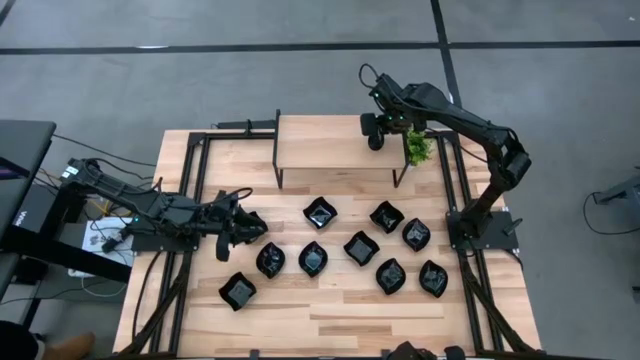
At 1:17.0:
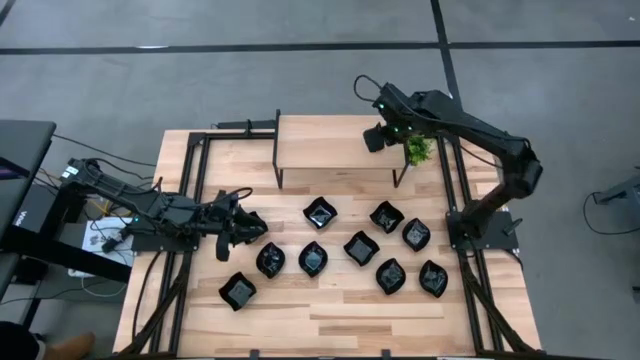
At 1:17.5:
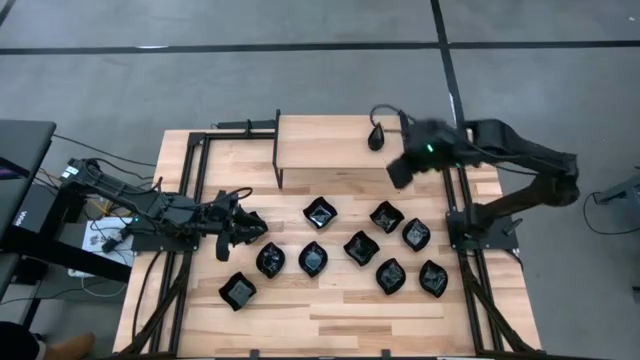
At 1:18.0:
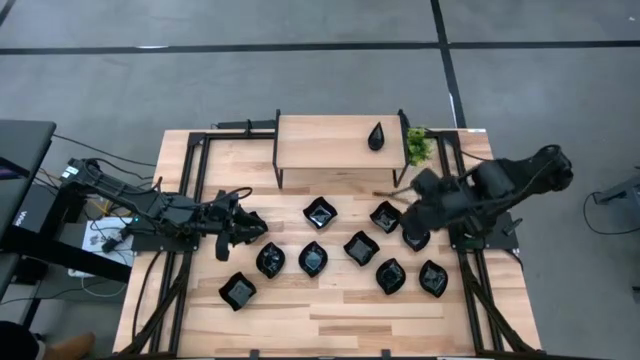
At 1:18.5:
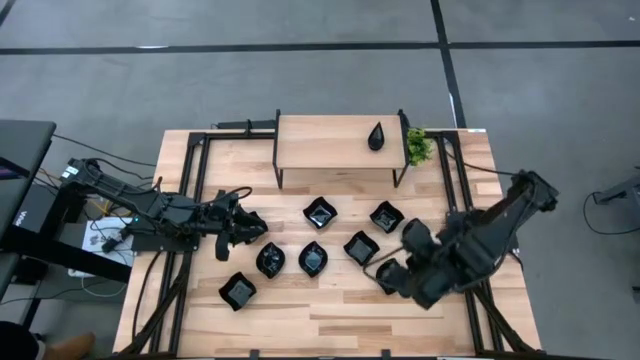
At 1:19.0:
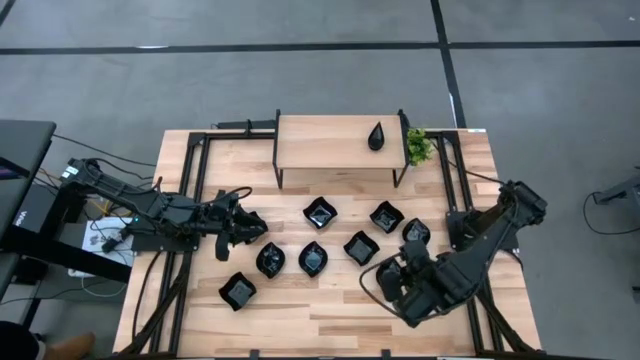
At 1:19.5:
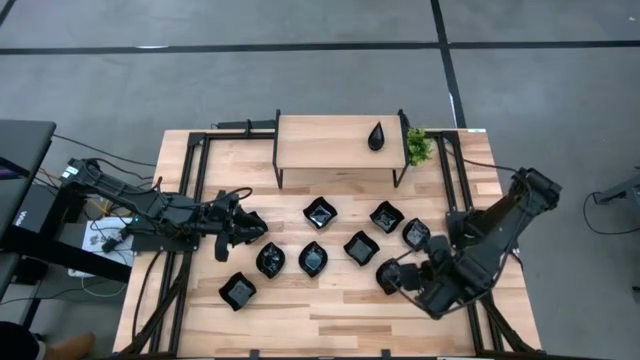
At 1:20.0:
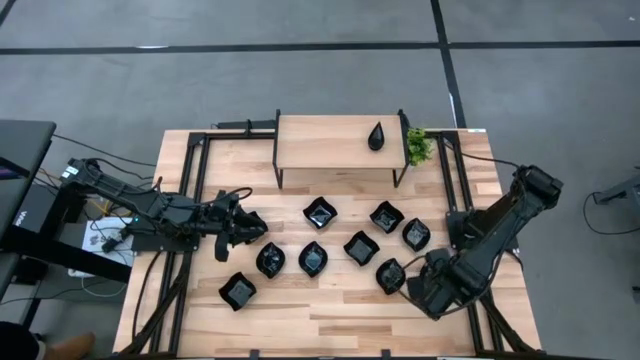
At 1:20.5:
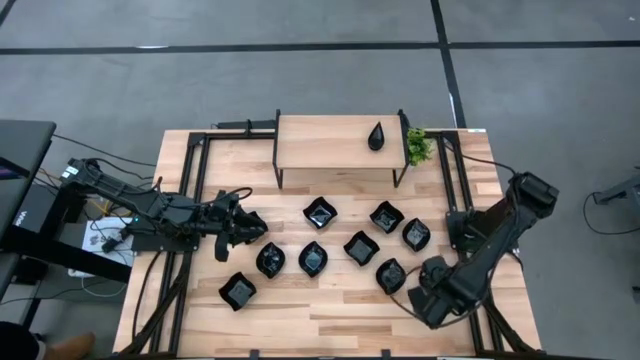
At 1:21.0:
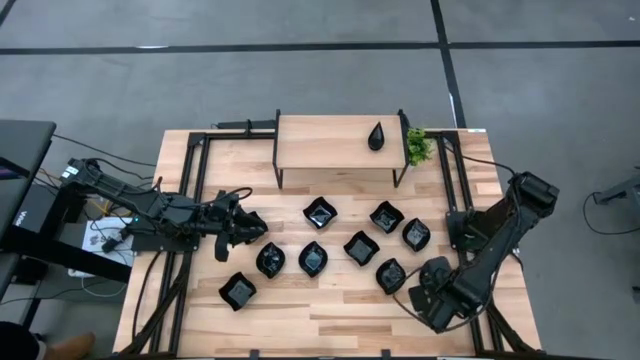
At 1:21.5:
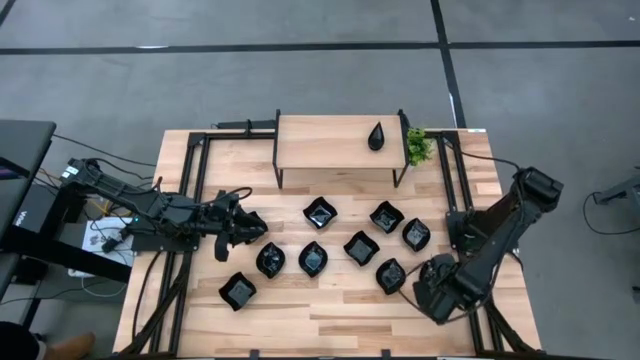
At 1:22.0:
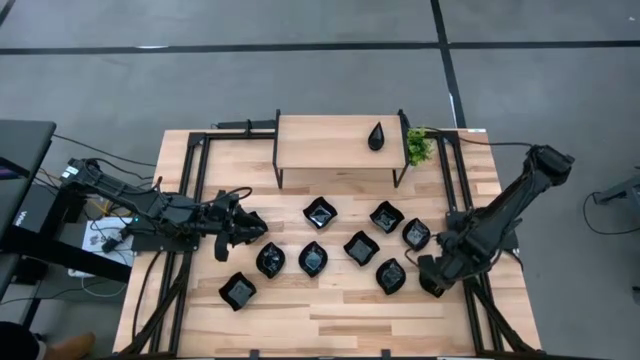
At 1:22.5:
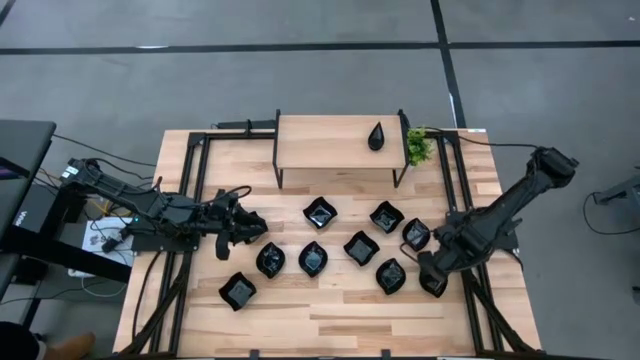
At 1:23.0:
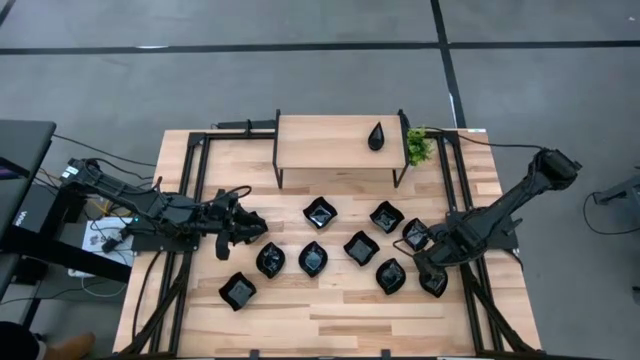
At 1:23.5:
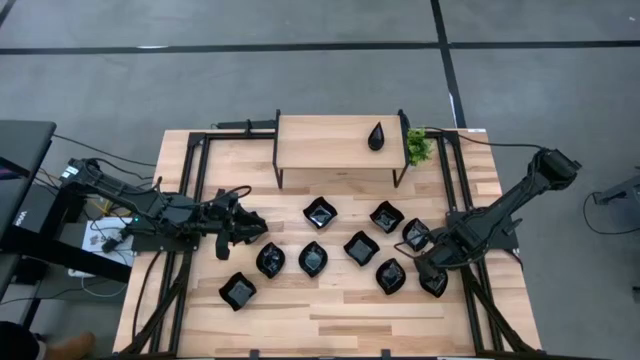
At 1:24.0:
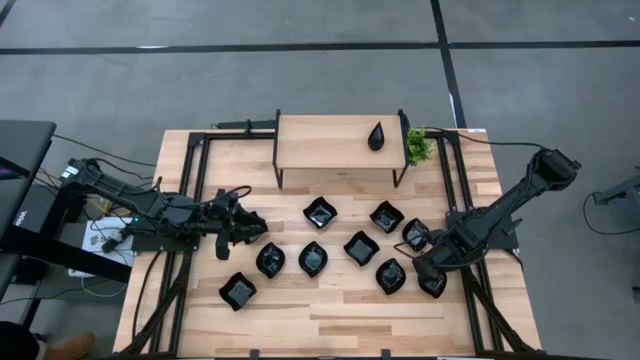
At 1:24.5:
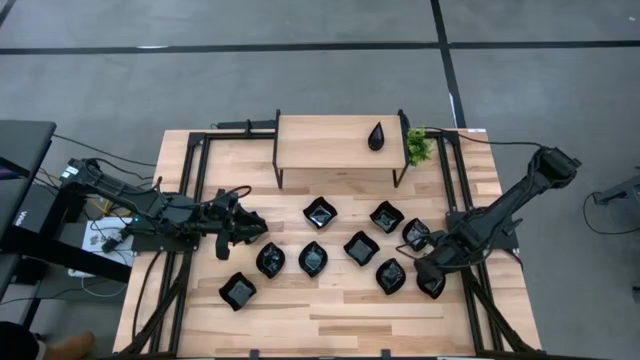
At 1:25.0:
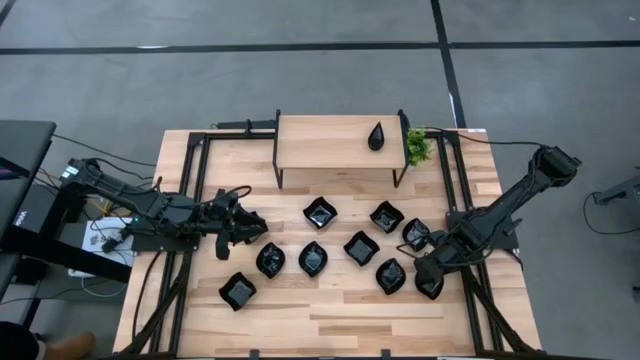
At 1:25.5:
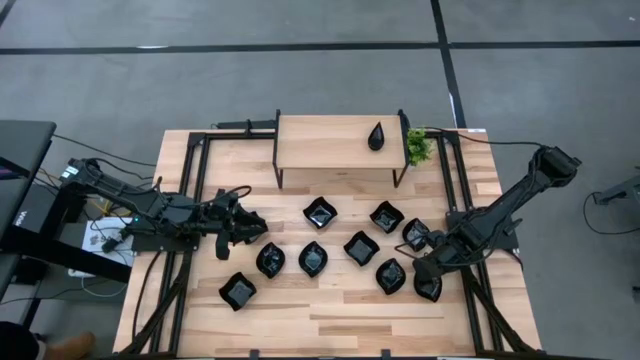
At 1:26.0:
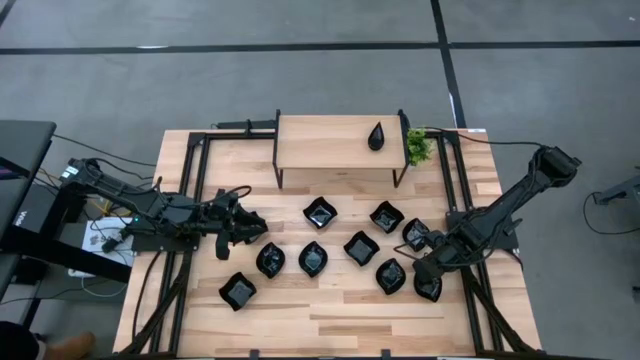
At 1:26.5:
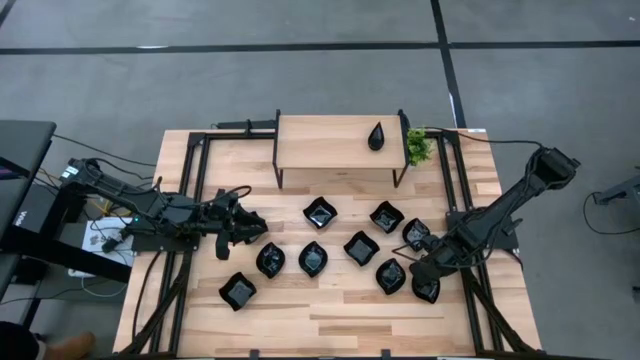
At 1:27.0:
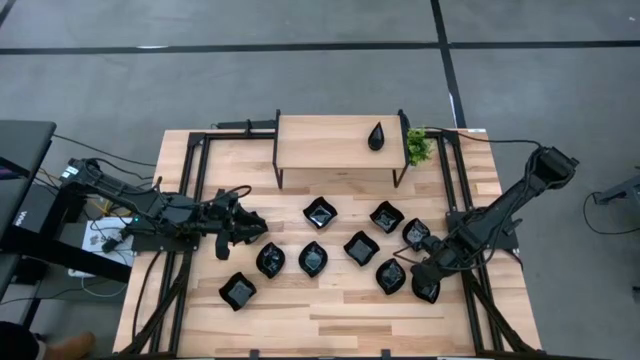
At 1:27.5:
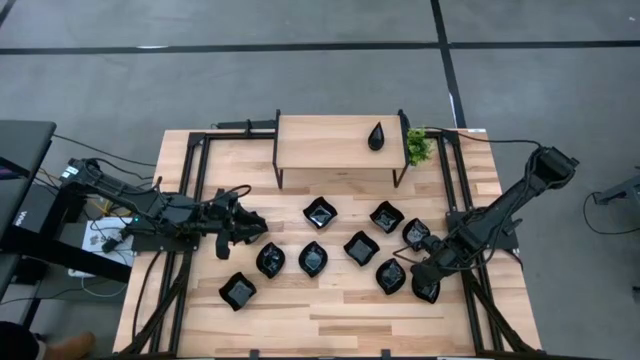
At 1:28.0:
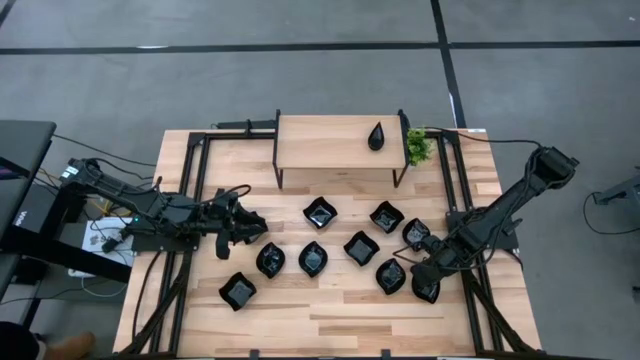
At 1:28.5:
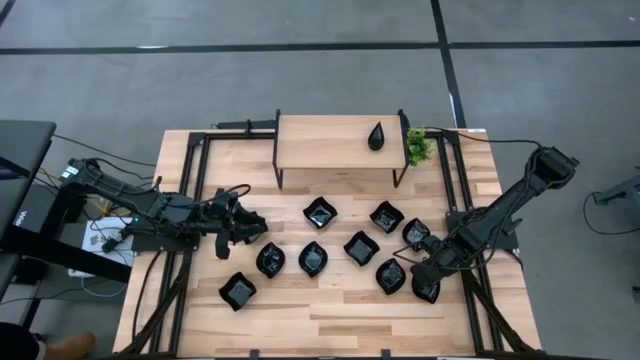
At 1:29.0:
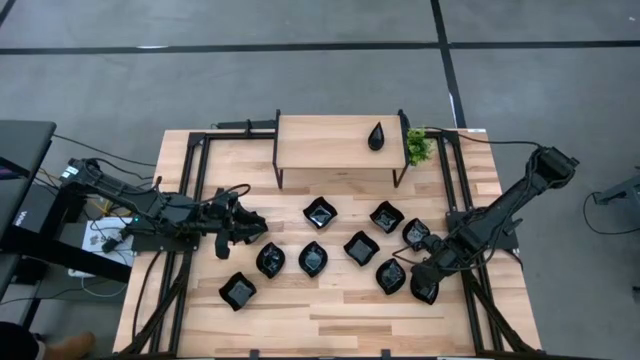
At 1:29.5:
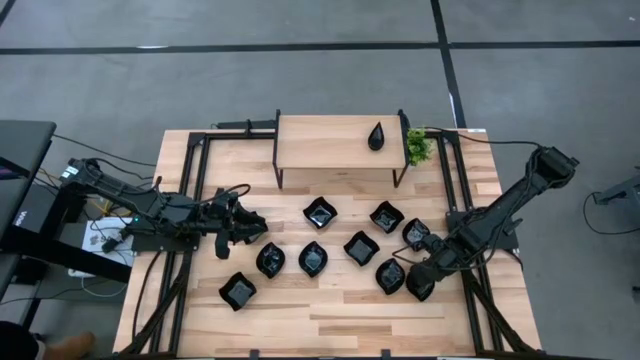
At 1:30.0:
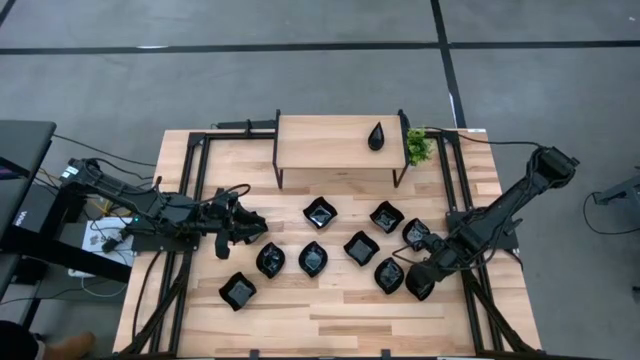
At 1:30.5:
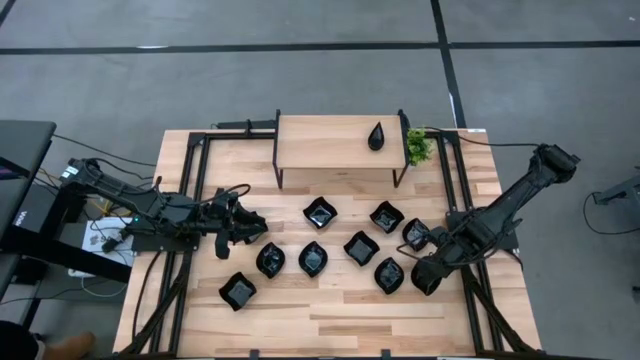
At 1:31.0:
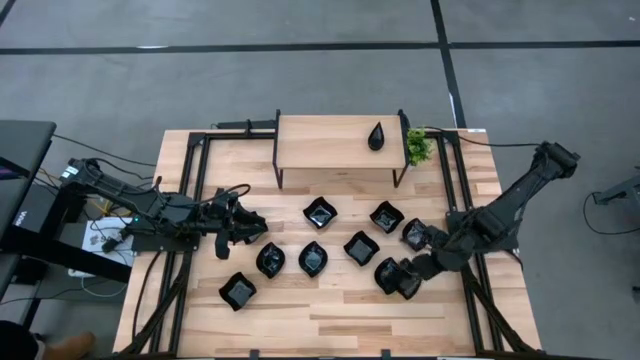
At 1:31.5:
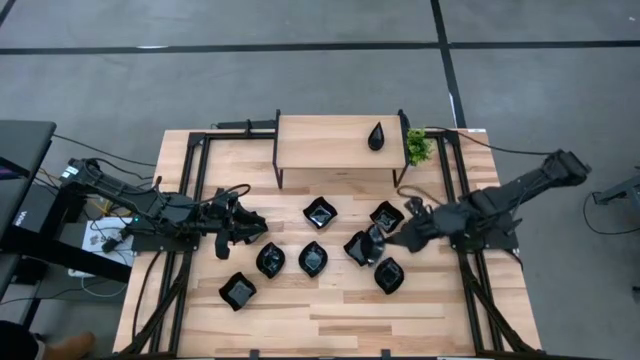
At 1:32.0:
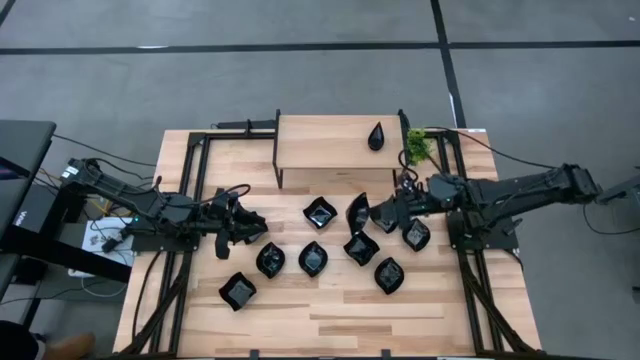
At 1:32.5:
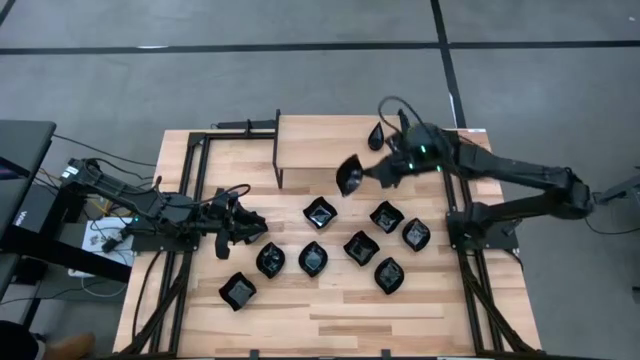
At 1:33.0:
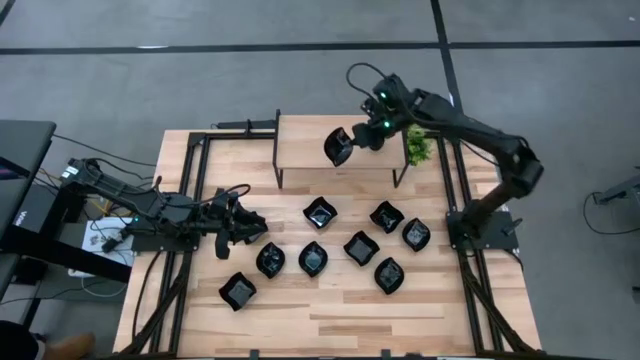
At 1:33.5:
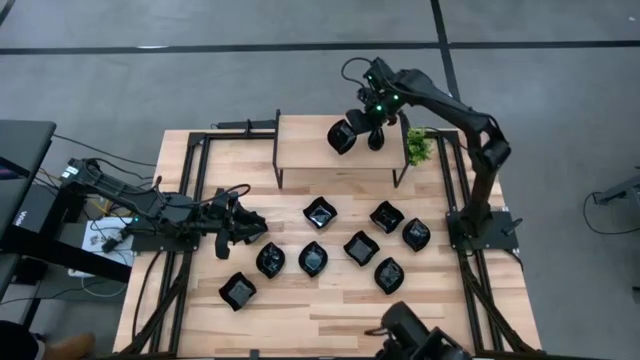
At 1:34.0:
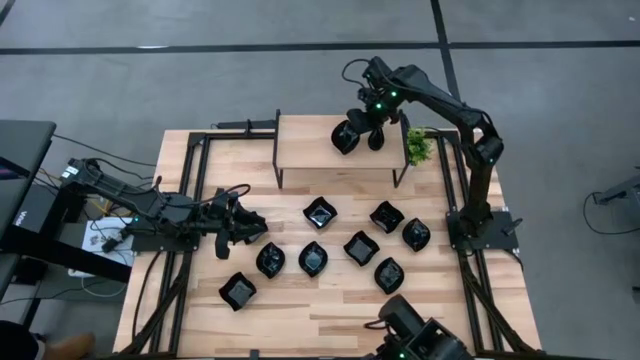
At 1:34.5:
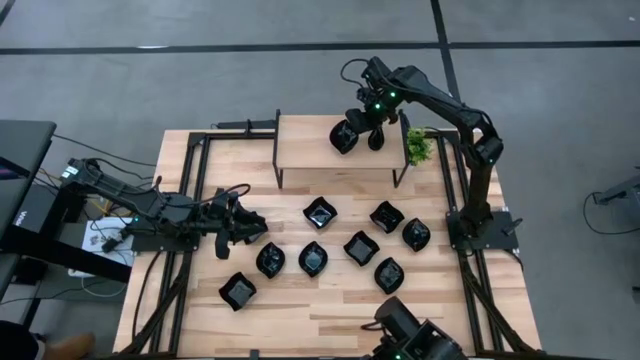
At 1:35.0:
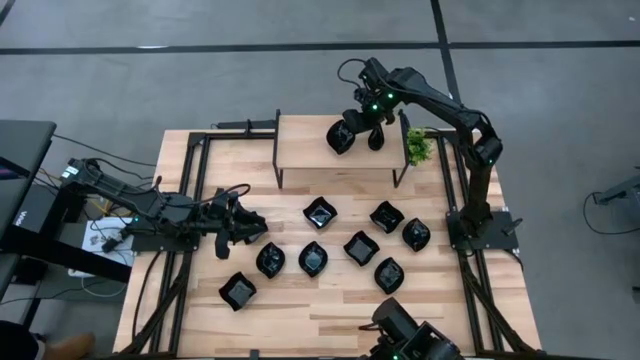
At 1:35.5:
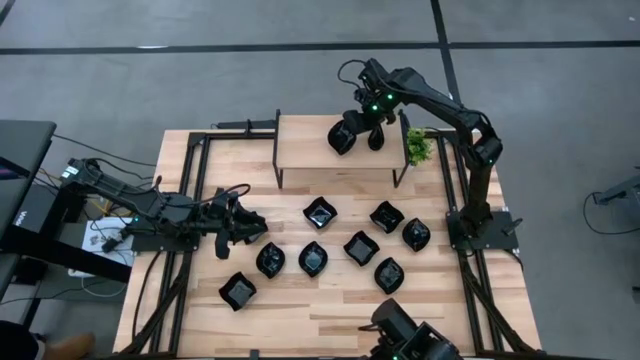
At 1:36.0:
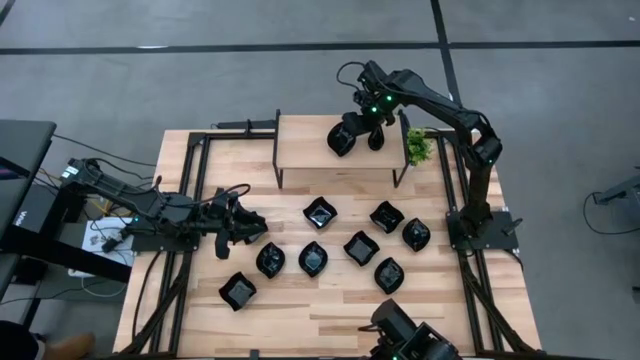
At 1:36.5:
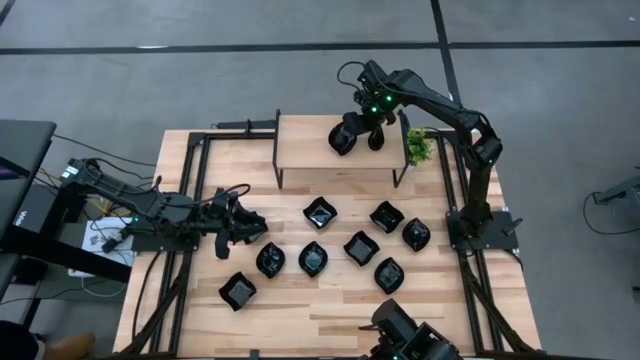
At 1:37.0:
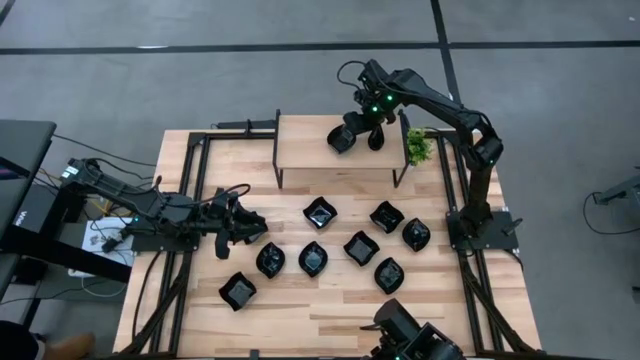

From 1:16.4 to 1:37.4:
Task: Pick & Place Mini shaped plates
Put the leaf-shaped plate on the shelf

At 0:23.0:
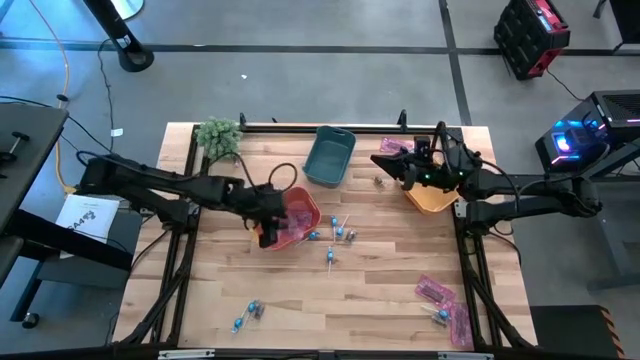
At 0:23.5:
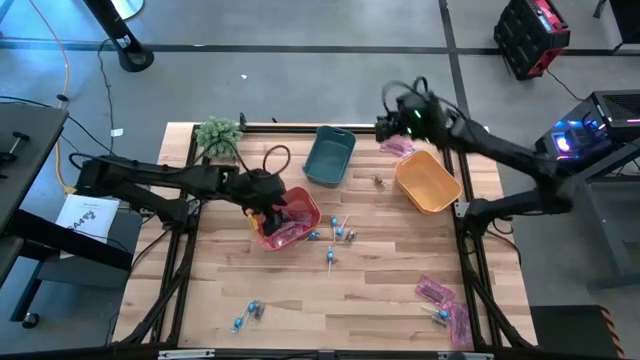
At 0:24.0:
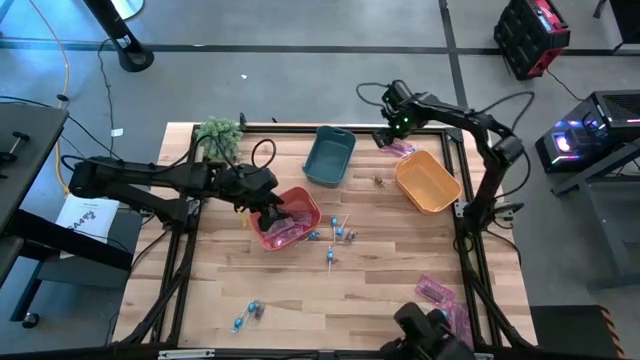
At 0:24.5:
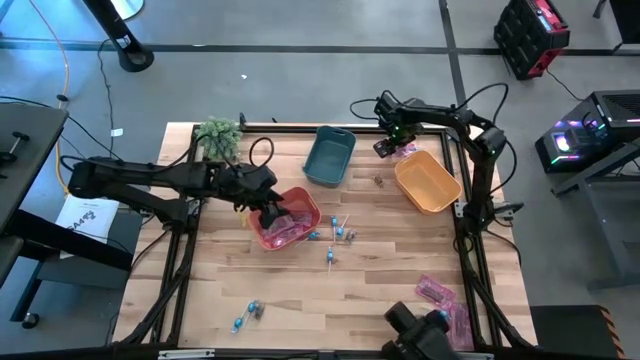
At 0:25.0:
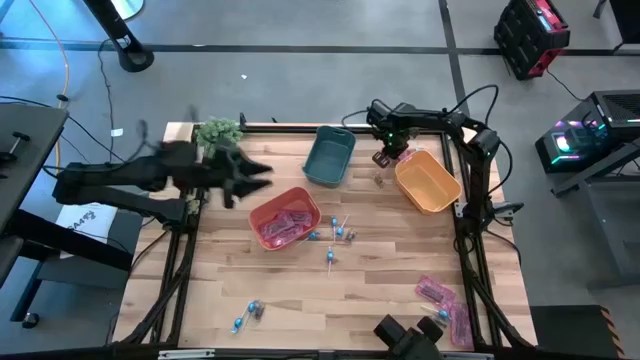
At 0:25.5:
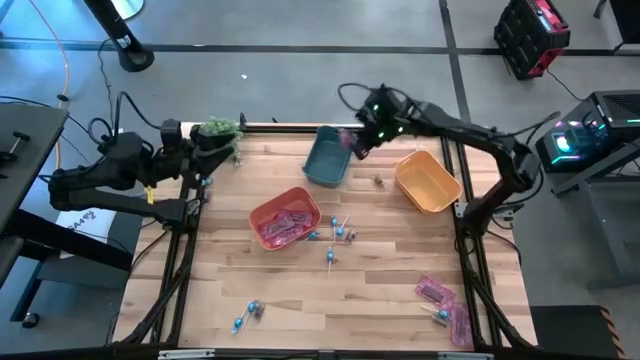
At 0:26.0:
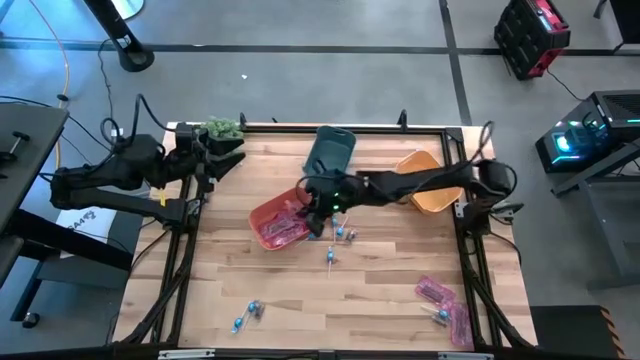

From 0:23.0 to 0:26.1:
Task: Sort candy
Put the red candy into the orange bin
